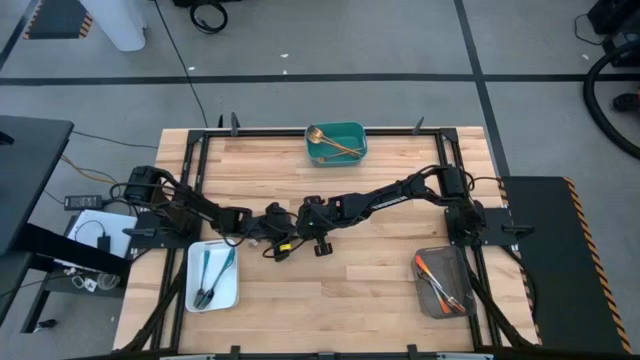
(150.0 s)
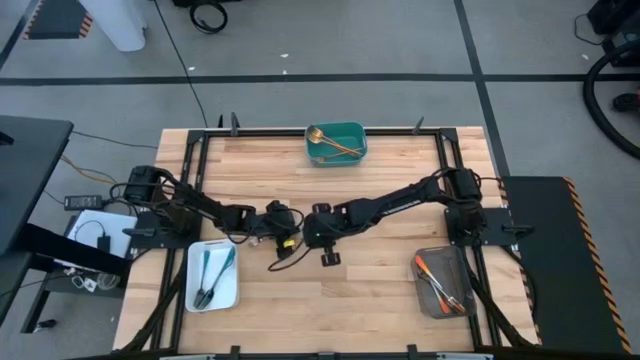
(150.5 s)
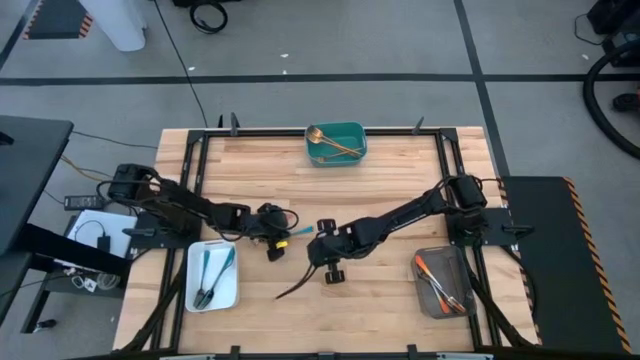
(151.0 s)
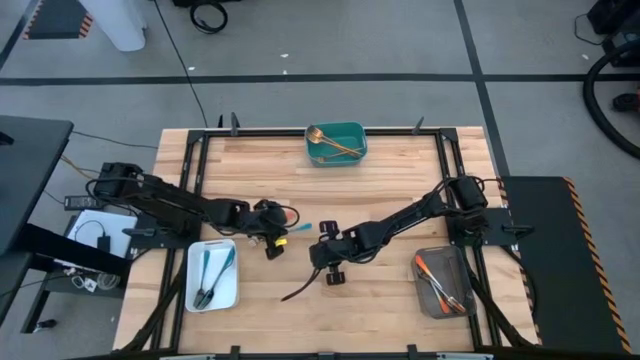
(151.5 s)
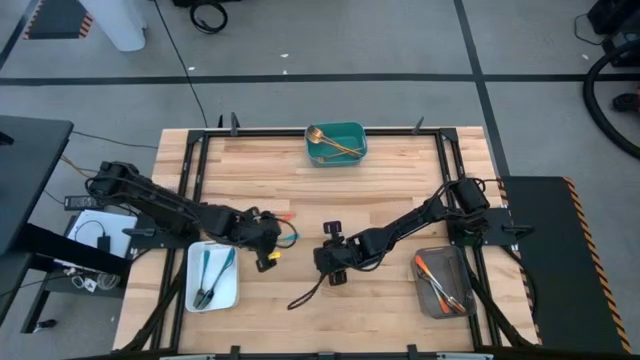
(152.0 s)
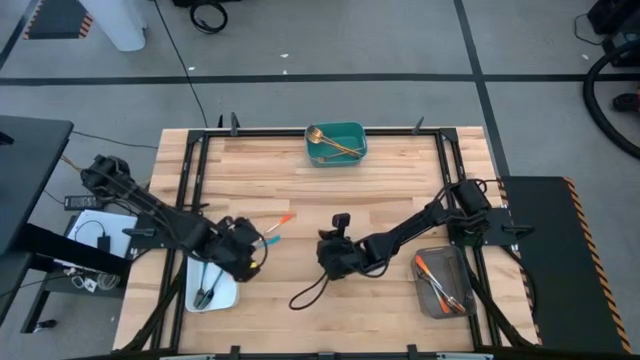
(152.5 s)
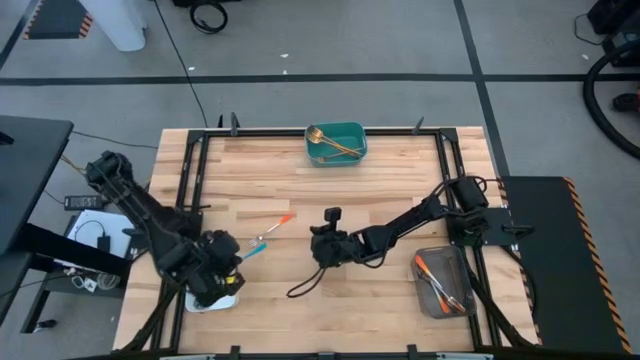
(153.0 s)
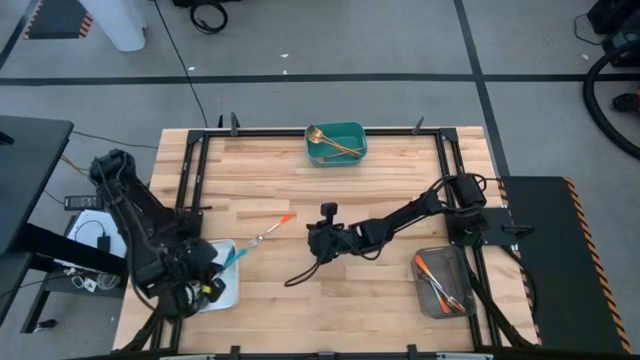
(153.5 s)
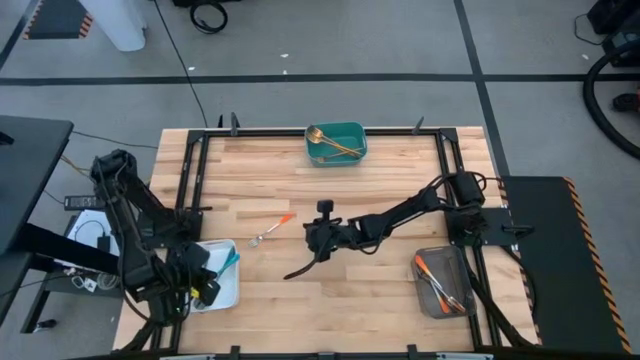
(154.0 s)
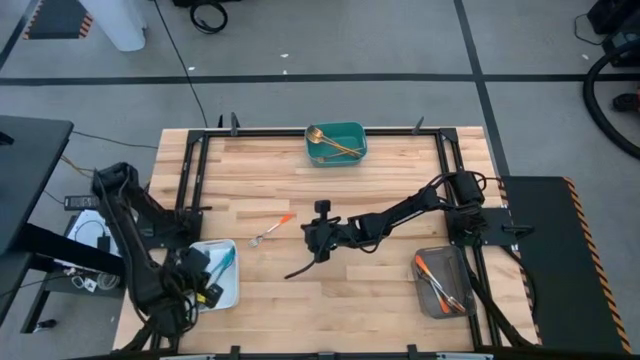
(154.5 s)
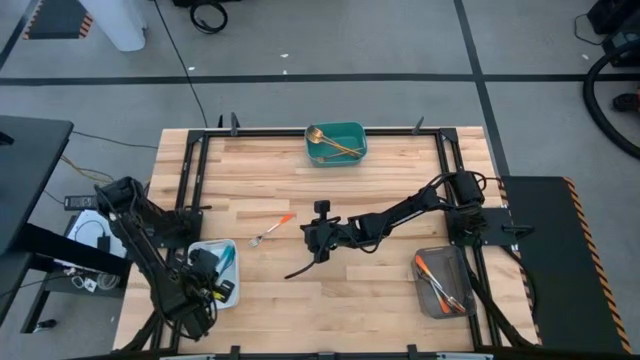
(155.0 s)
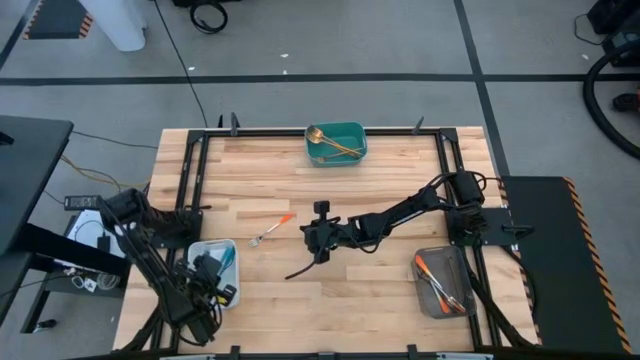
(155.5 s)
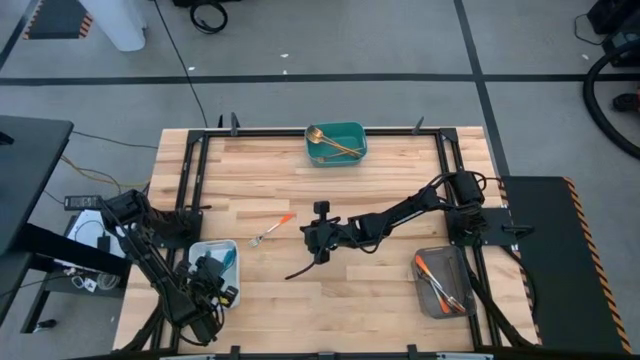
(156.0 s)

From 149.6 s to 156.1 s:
Task: Sort silverware by color (type)
Put the blue fork into the white bin

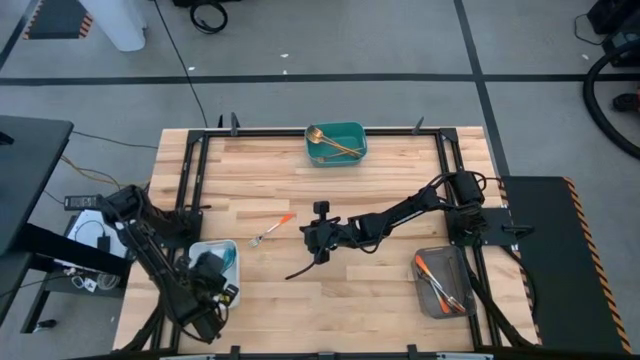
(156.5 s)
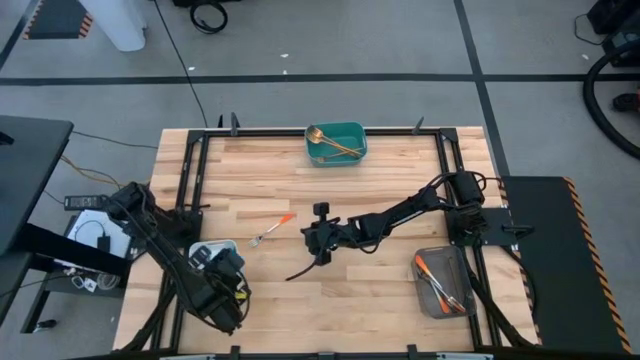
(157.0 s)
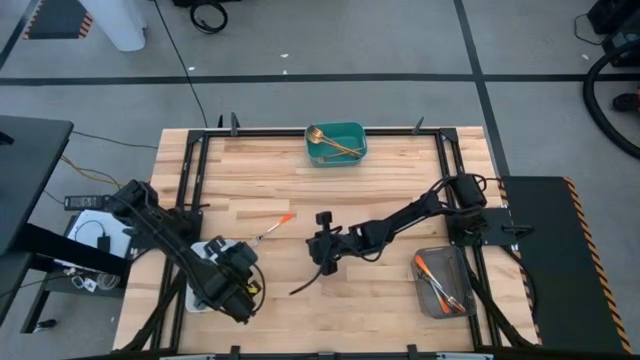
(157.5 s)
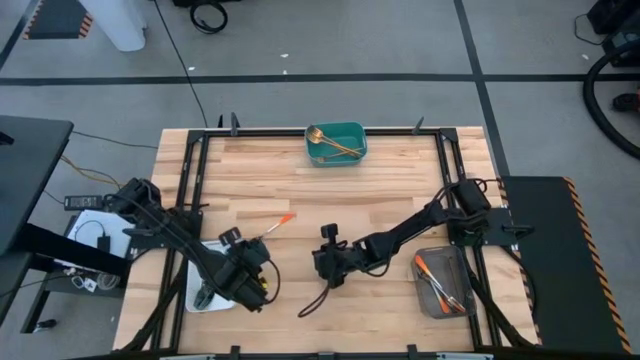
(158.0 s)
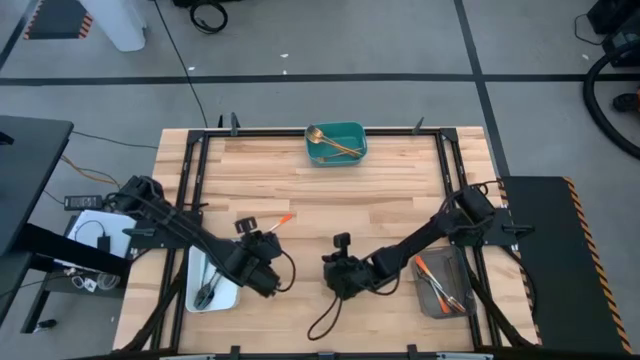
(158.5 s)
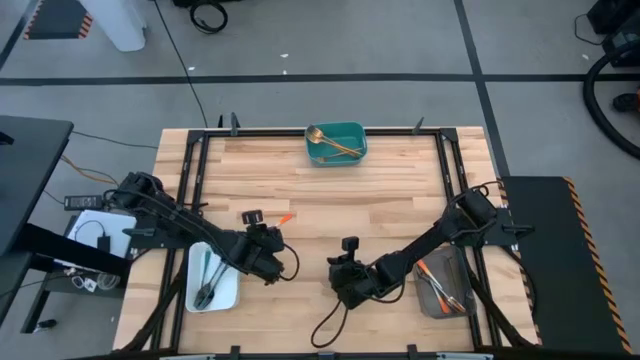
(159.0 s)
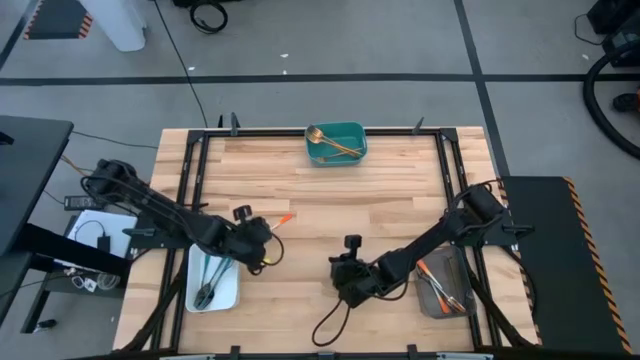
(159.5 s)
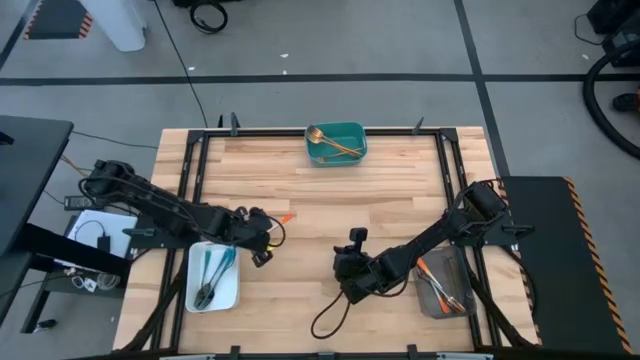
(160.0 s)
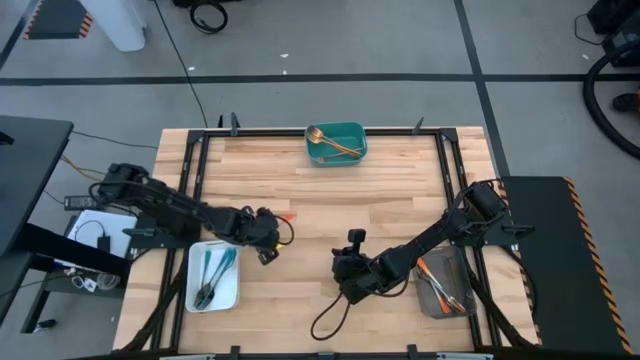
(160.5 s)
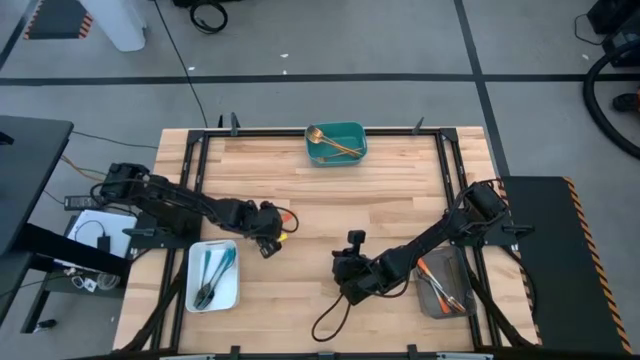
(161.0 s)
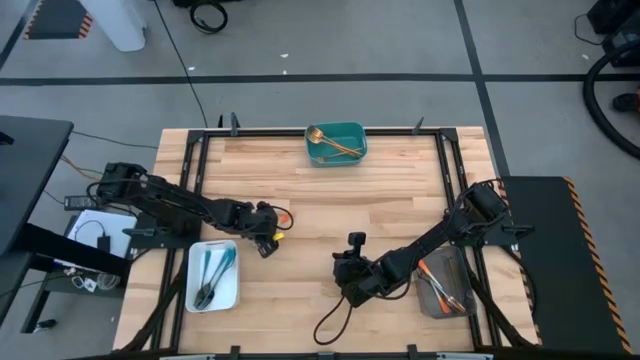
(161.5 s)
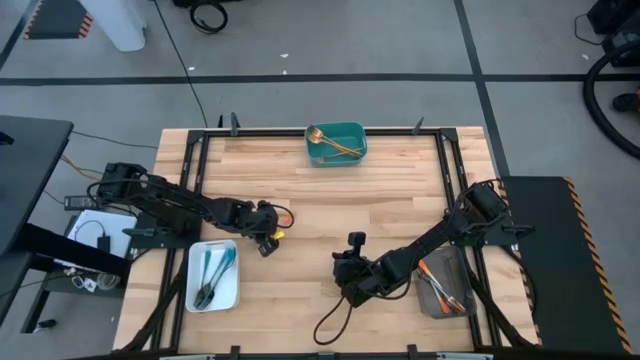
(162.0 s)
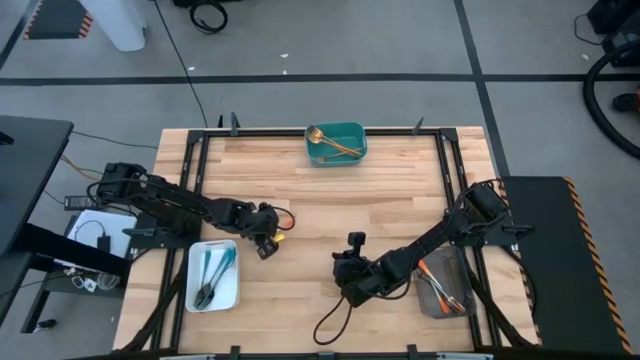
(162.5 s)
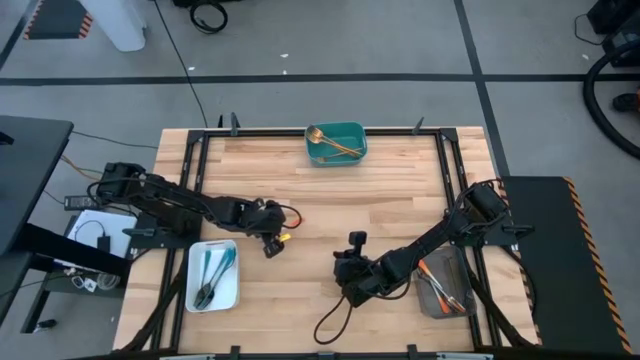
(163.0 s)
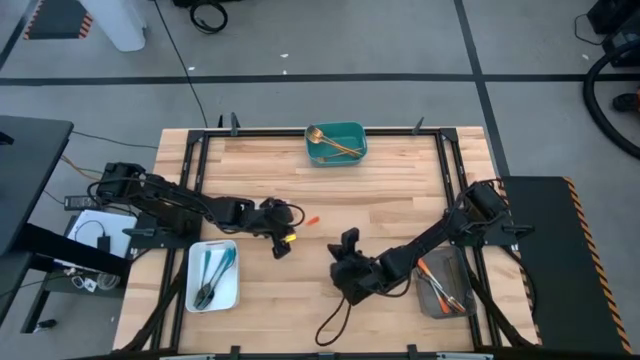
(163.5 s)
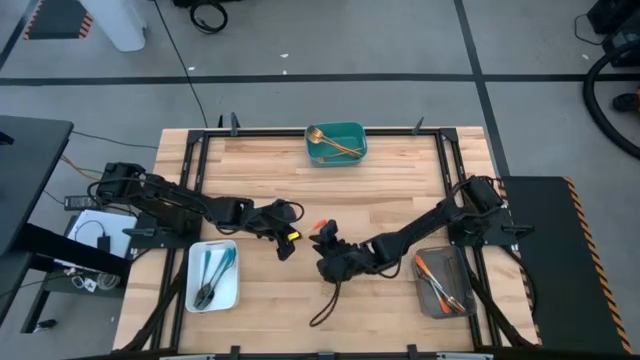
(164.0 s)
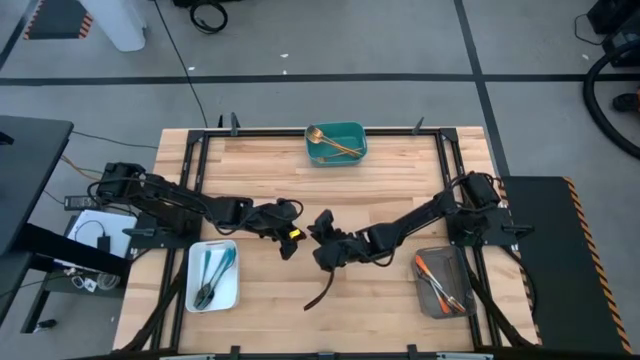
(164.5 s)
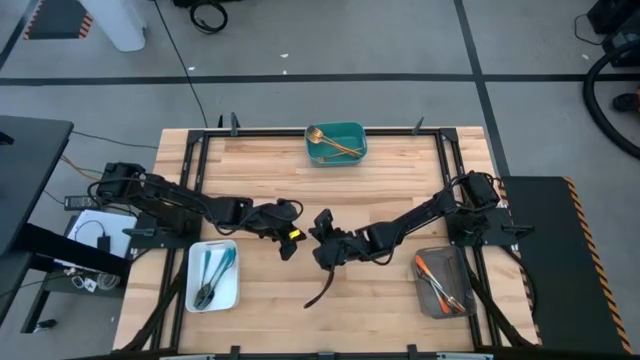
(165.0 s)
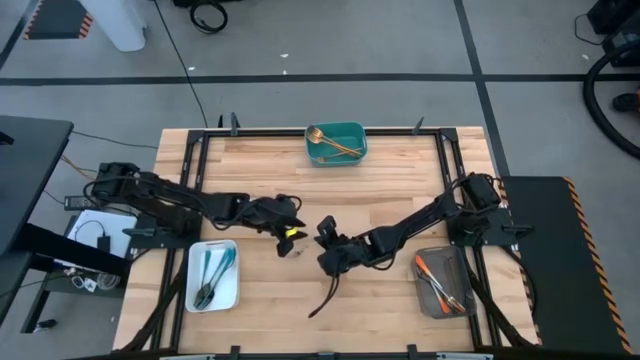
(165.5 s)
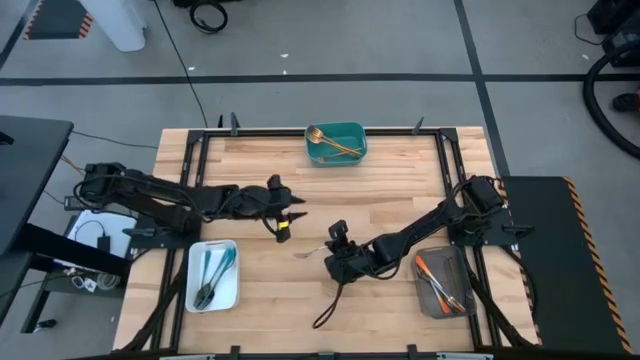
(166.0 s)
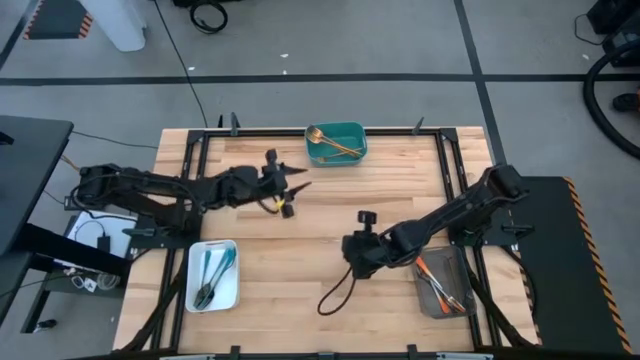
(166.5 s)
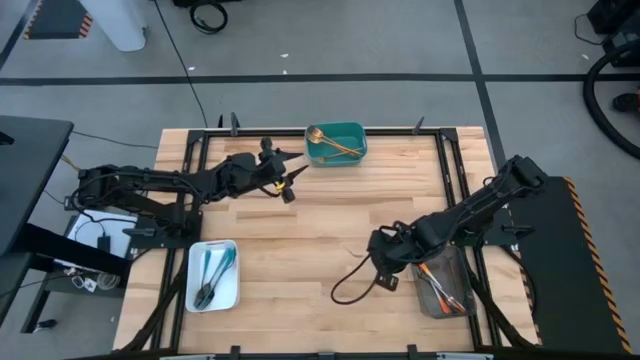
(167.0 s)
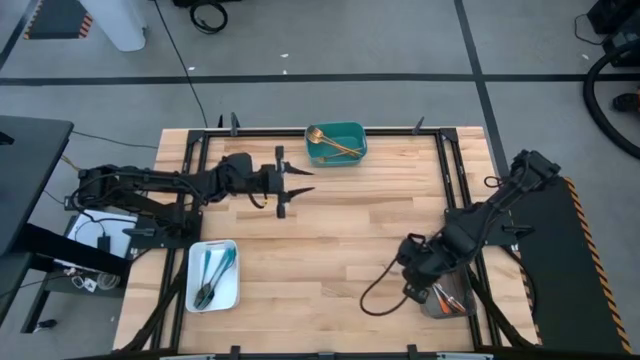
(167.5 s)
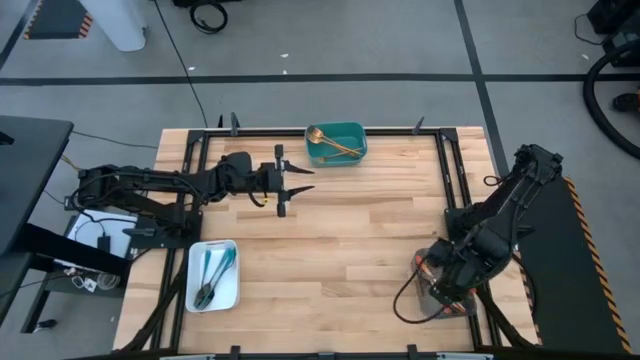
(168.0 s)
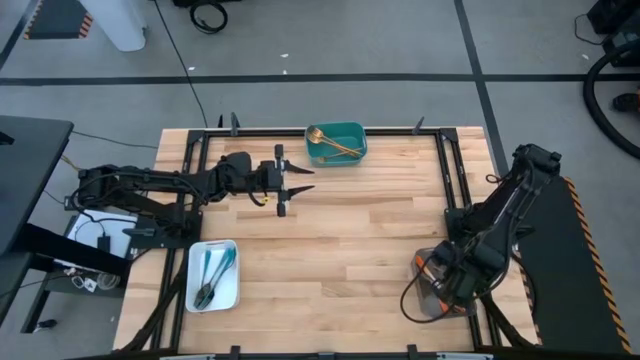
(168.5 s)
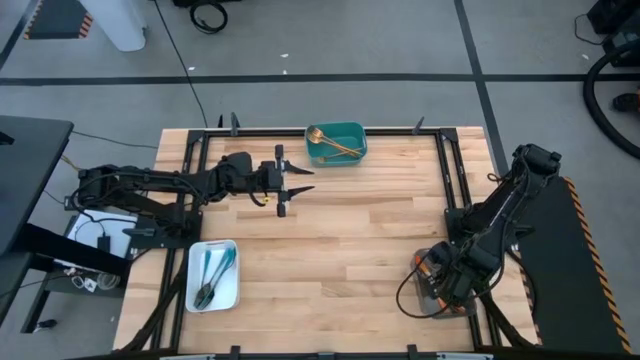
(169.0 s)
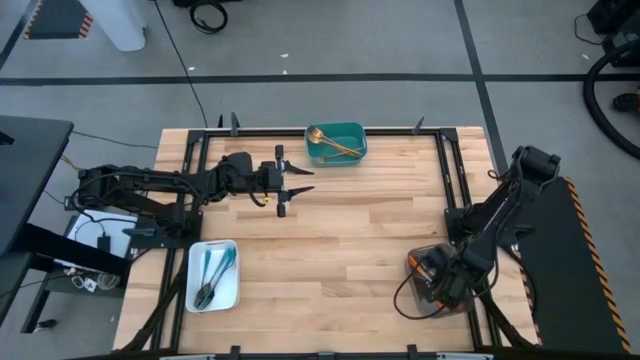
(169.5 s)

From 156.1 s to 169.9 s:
Put the orange fork into the black bin

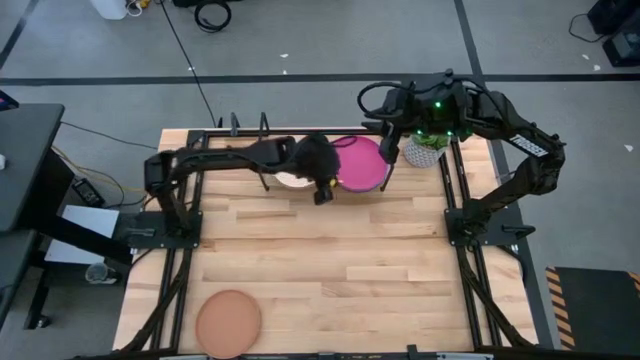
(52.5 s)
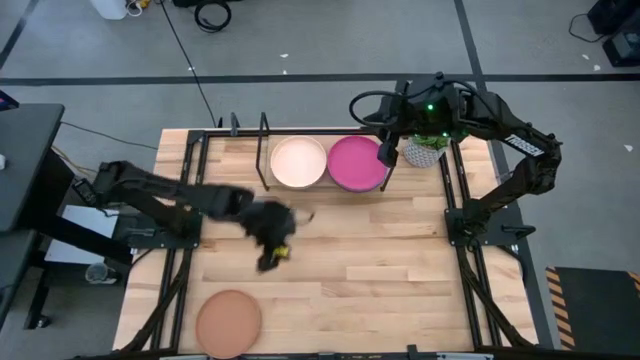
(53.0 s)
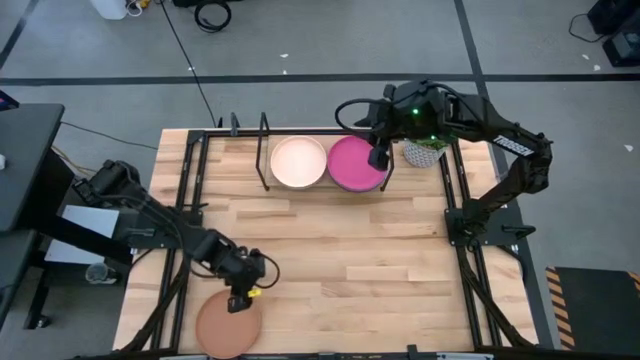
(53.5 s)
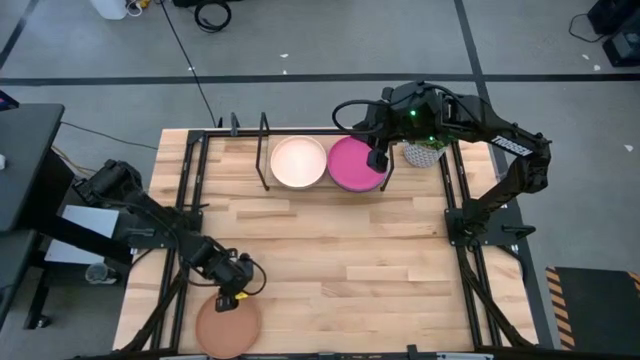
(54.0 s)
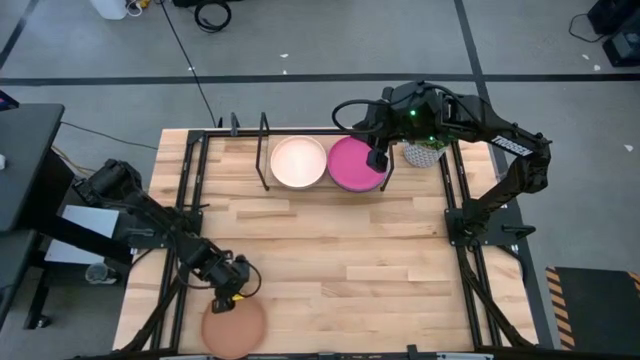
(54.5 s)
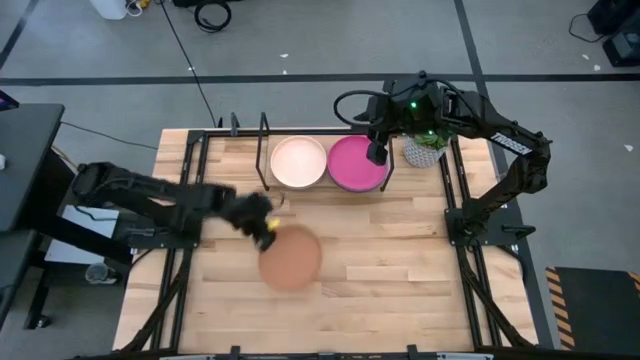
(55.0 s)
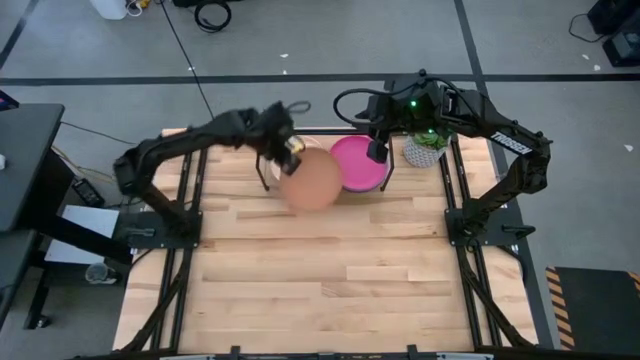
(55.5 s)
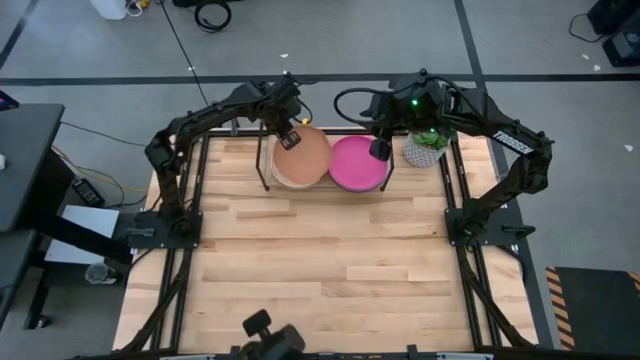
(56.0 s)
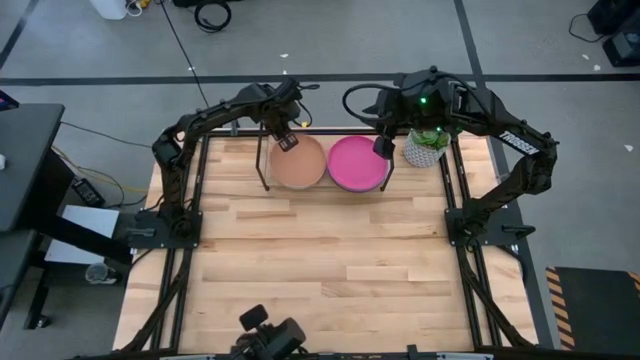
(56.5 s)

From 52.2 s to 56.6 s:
Task: Place and stack plates onto a shelf
Stack the brown plate on top of the white plate on the shelf
